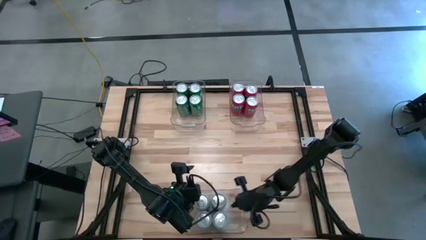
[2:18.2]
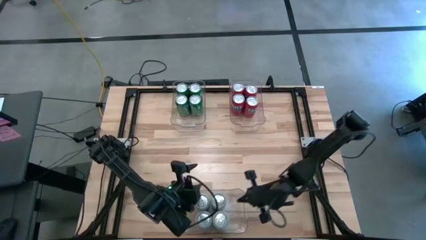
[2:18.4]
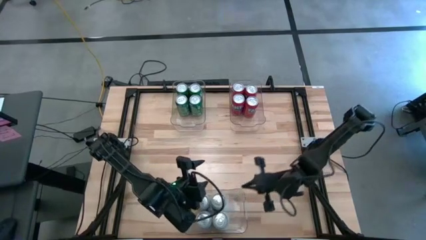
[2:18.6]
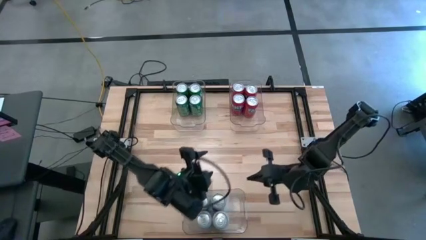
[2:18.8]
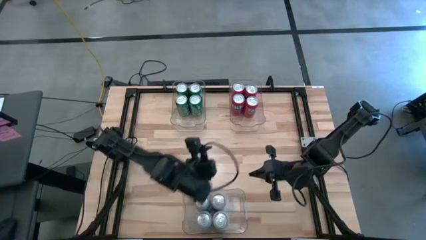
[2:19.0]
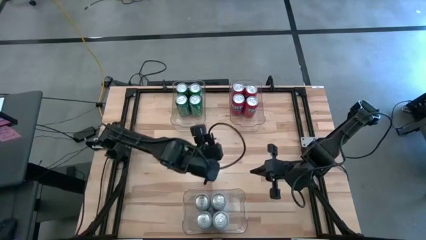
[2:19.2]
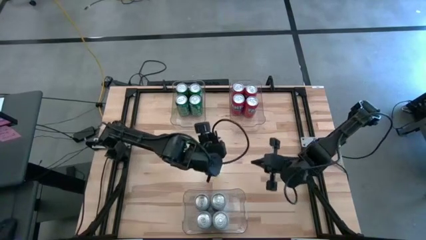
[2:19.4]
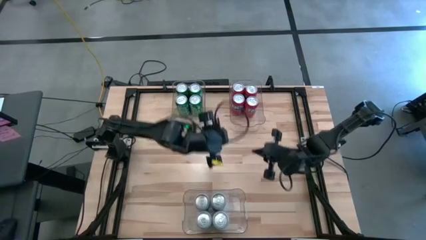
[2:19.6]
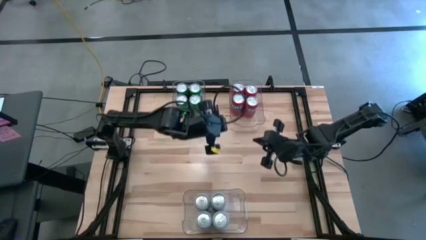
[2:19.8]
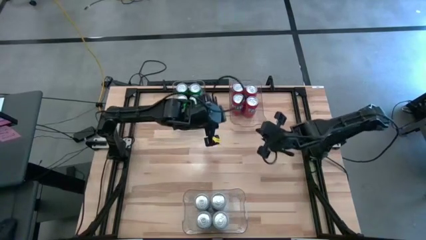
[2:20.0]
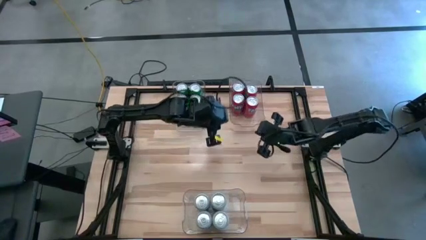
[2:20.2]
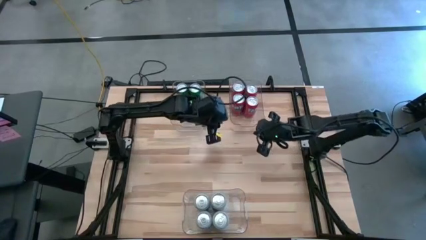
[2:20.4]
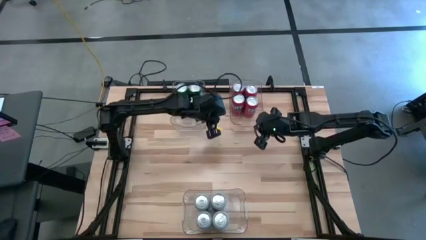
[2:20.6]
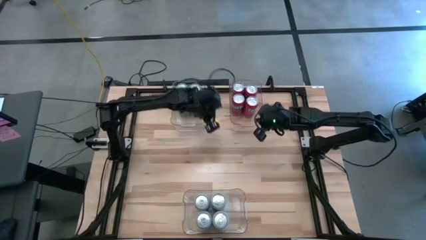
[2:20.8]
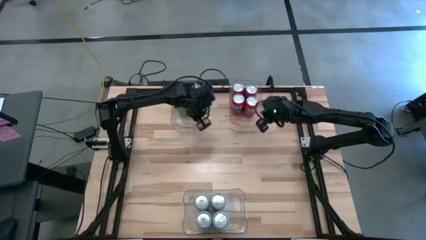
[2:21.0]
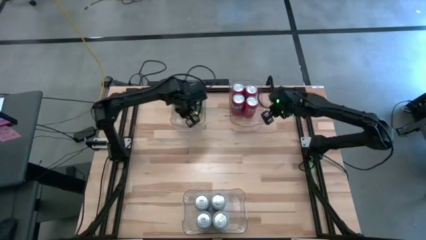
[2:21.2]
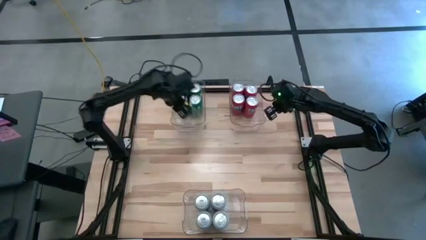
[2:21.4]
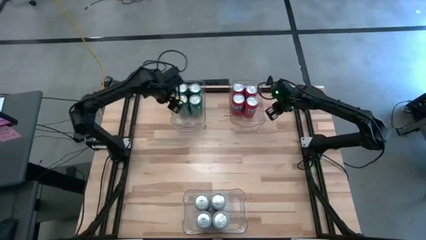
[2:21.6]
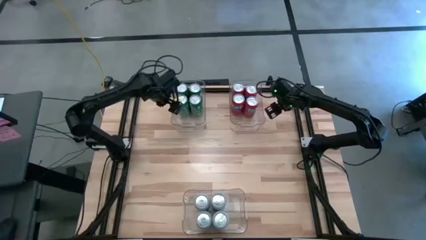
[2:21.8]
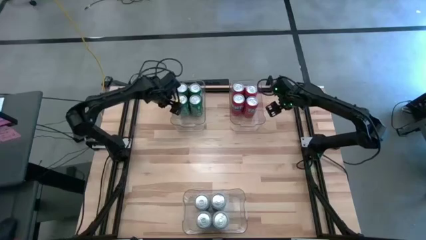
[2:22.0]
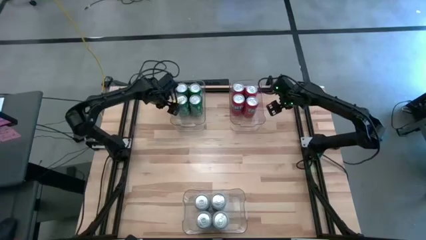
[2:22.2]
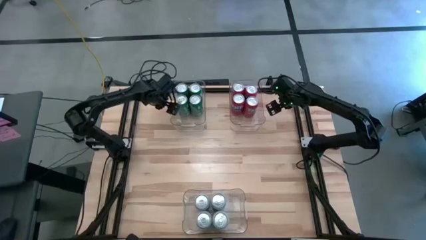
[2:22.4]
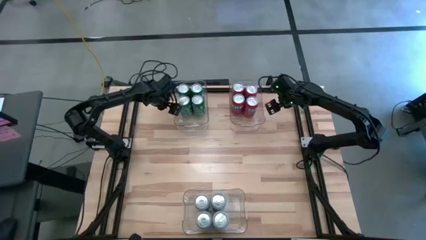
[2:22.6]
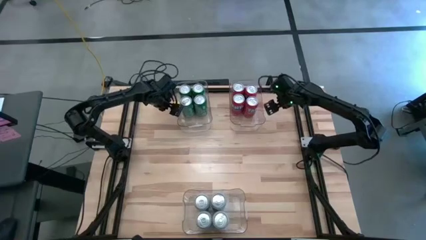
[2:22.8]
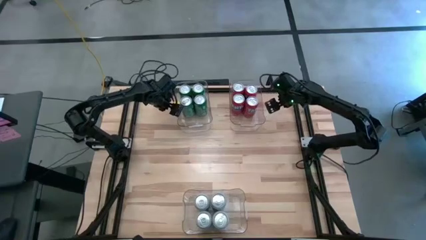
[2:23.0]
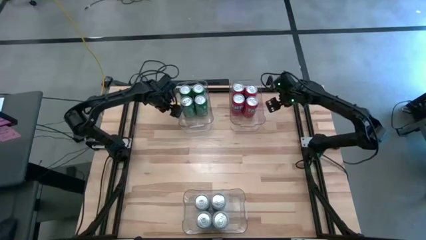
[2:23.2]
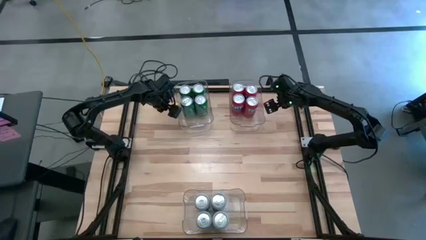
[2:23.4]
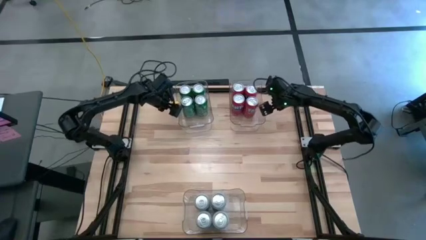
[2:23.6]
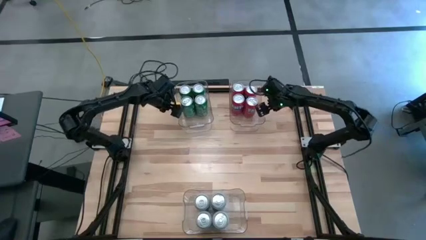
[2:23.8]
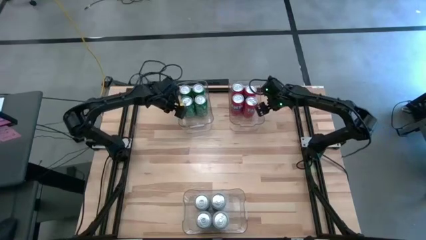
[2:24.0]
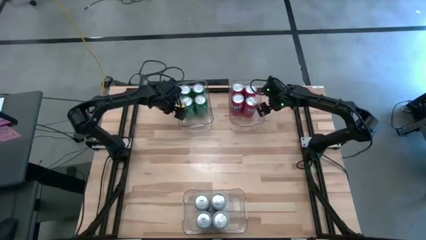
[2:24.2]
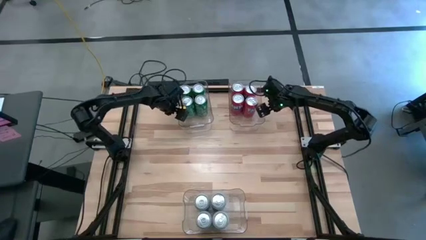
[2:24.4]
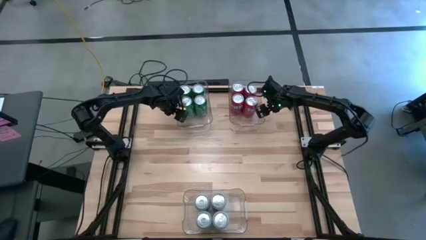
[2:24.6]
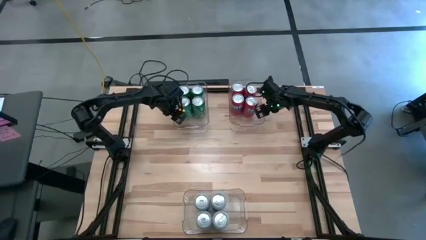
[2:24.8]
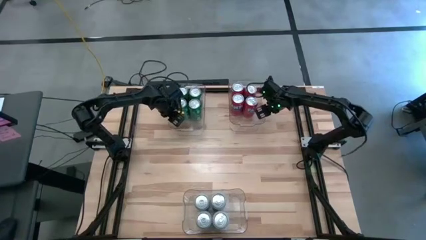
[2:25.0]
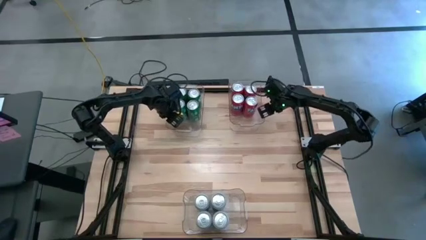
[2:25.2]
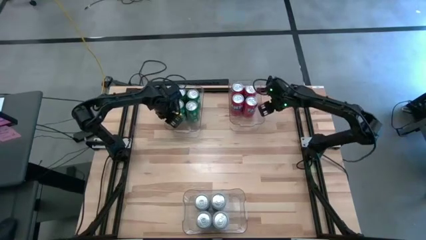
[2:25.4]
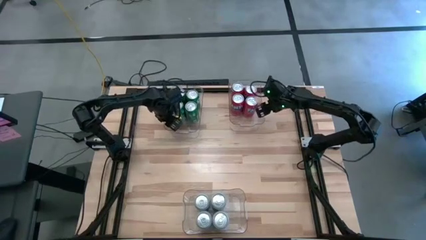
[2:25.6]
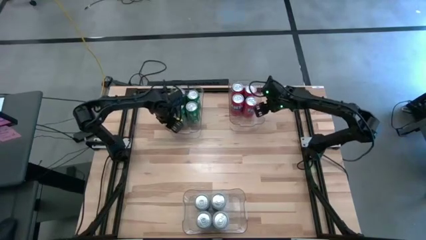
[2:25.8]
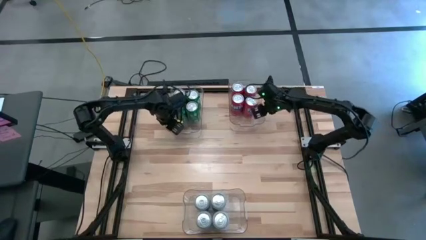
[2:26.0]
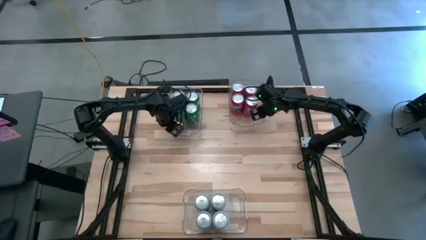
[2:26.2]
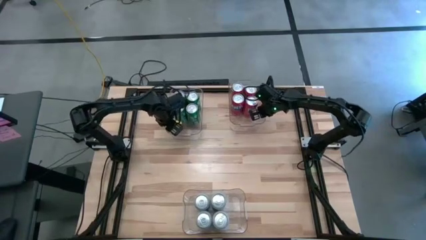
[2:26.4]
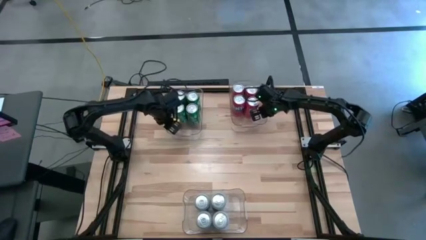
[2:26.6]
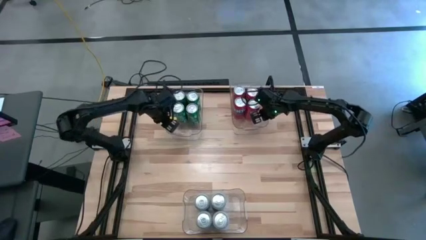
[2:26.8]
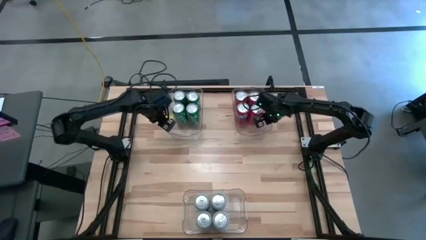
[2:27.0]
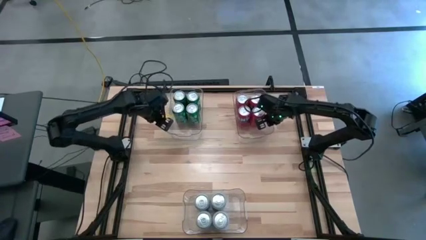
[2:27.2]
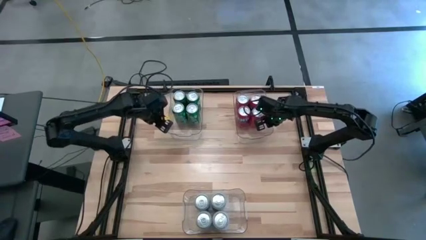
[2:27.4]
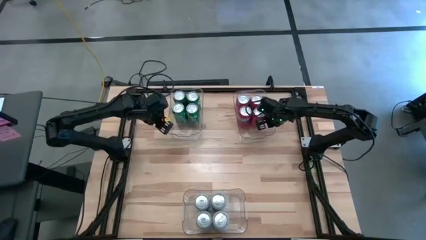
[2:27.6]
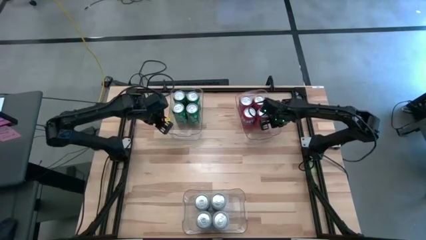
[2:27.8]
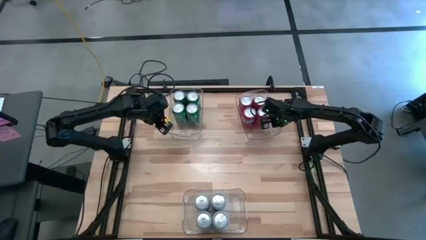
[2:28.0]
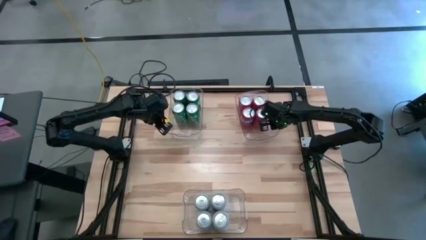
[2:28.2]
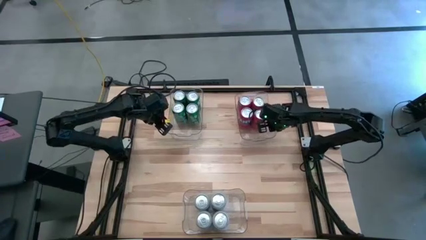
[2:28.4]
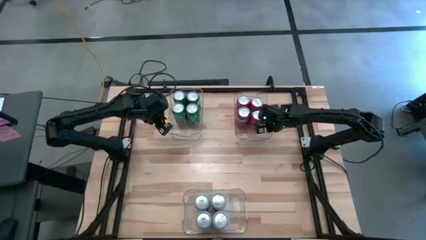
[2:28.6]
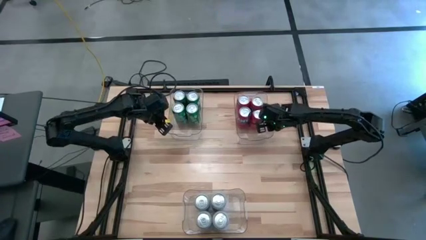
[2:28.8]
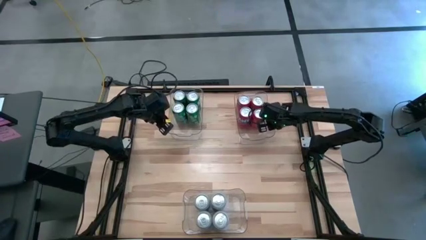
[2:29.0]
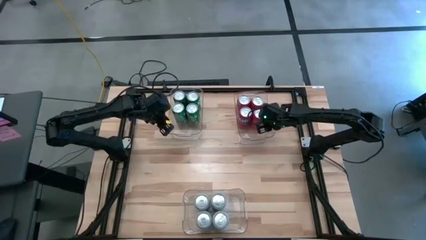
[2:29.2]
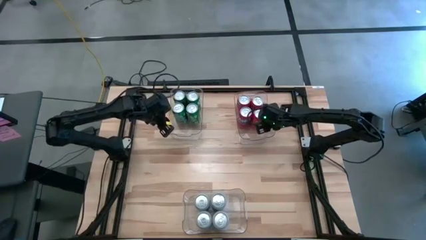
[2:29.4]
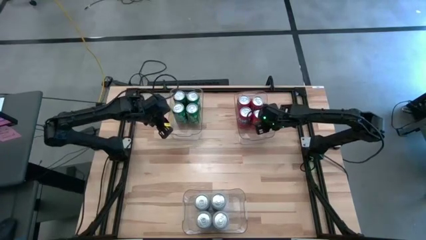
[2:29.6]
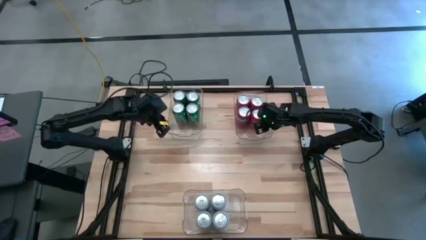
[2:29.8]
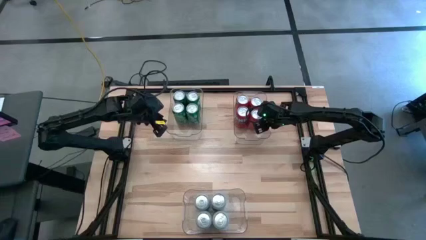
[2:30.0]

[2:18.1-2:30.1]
Task: Sort soda cans
Adjust the transparent bins
